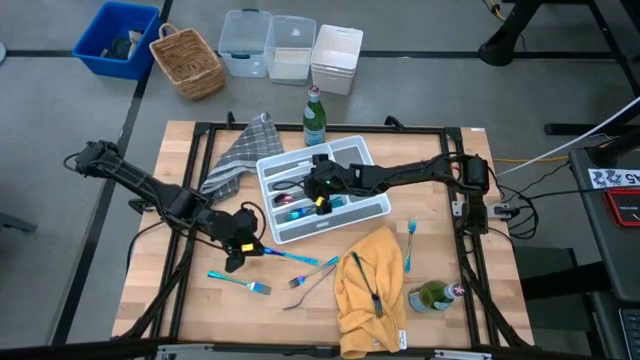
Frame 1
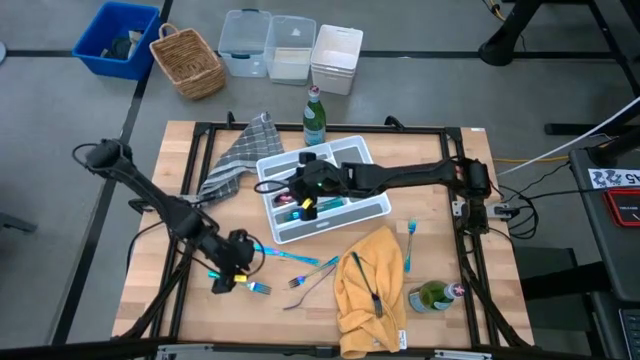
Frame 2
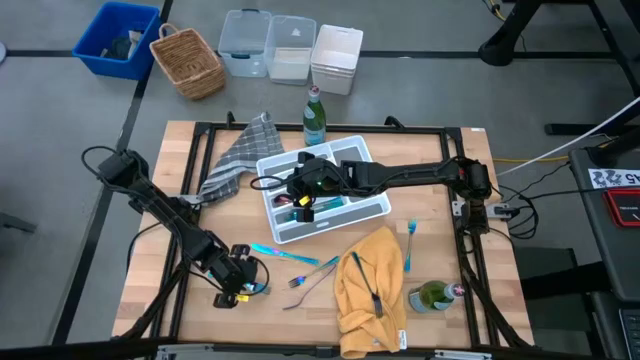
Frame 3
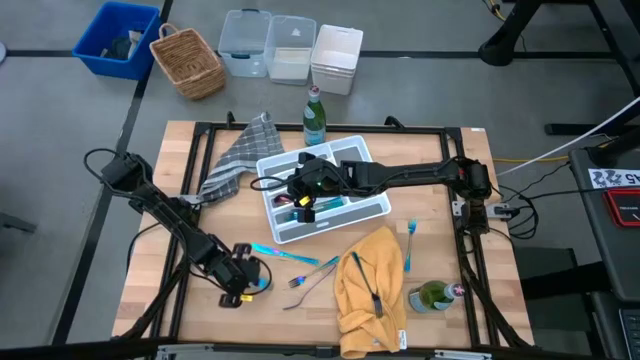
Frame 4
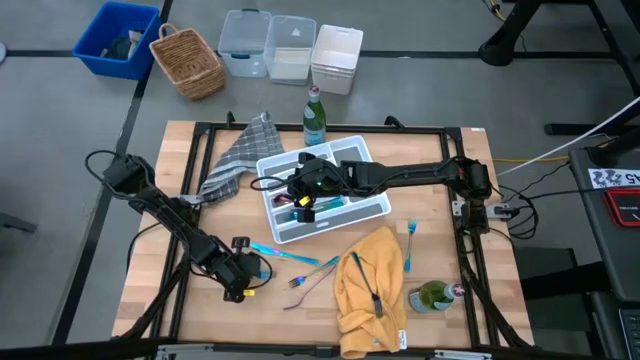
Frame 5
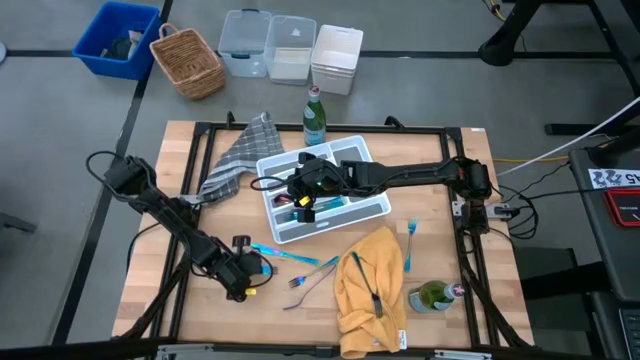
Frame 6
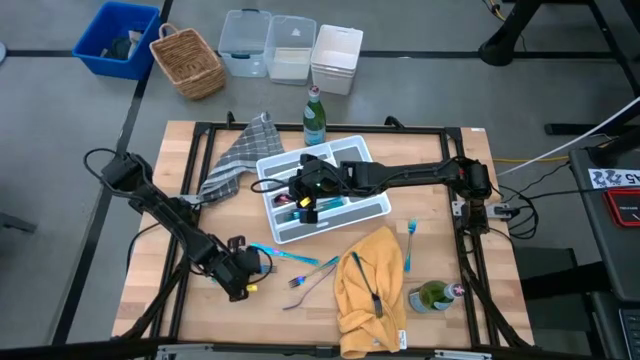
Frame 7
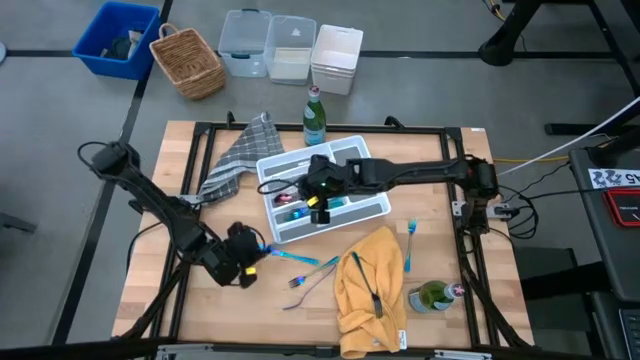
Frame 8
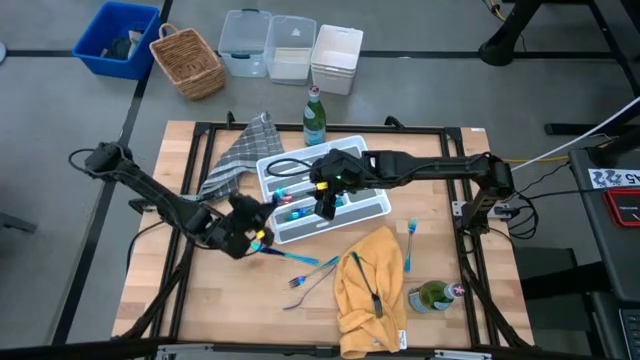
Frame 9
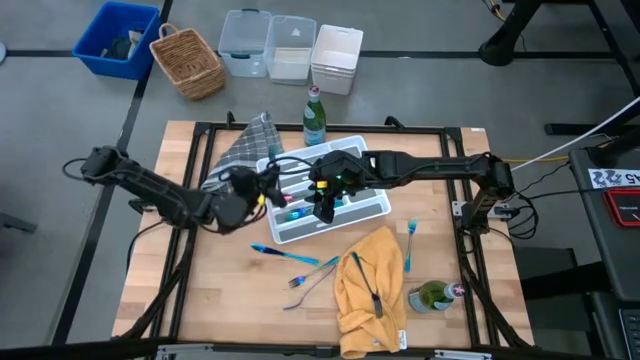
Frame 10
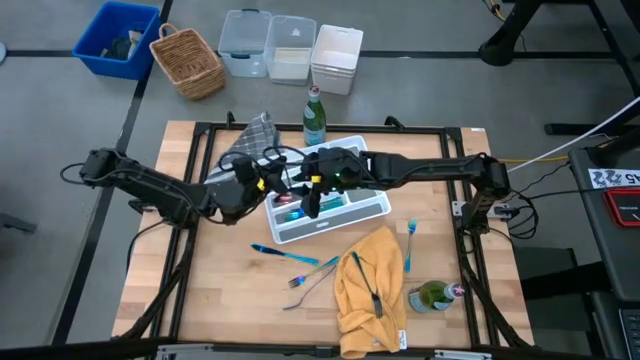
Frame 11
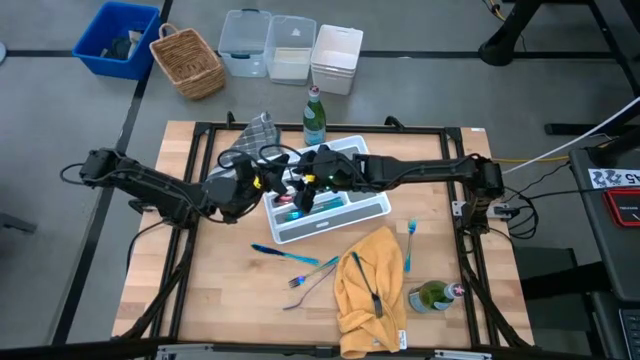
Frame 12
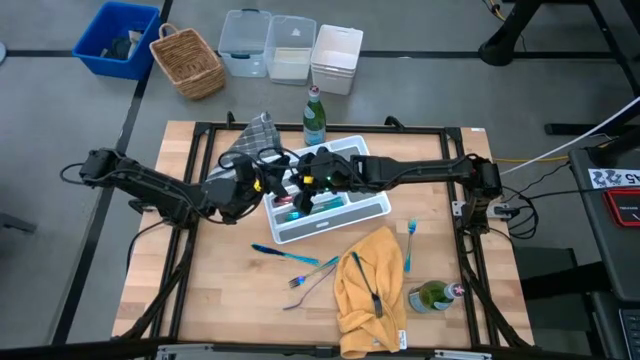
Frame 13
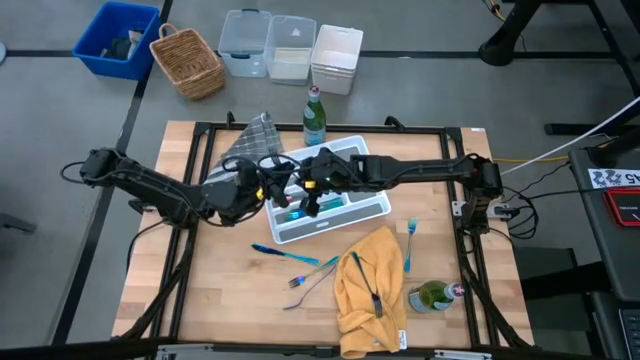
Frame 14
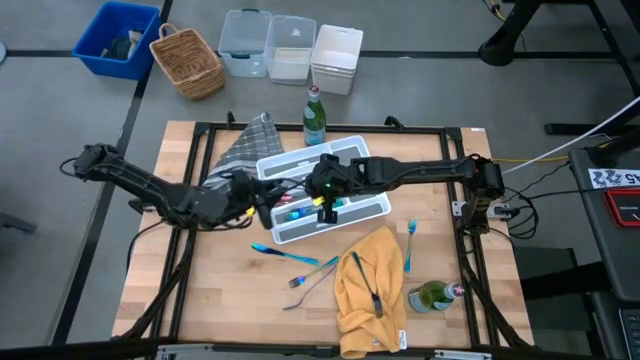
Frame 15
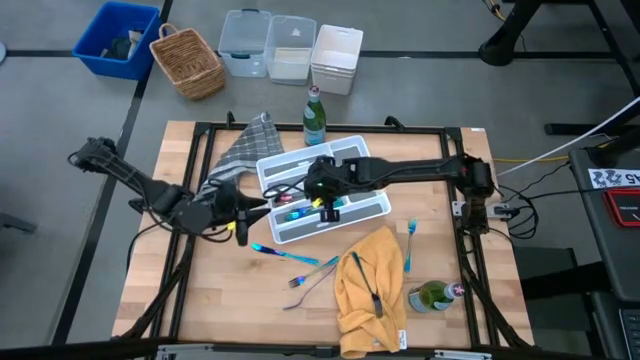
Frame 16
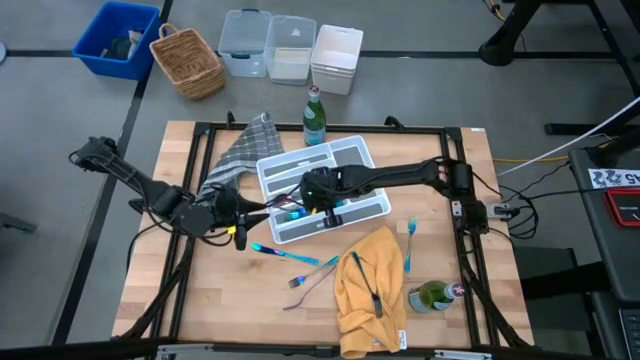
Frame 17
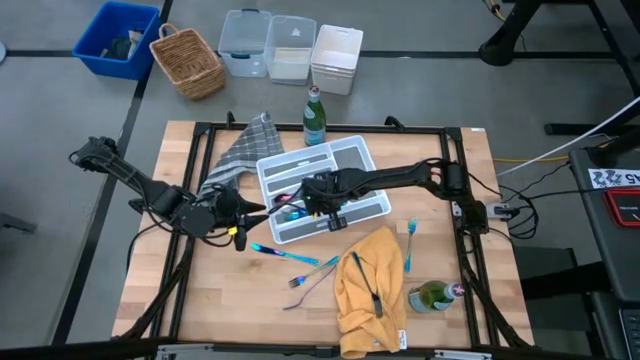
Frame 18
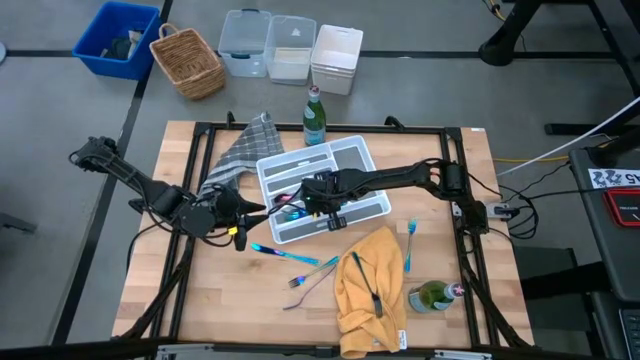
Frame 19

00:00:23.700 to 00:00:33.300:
Task: Sort silverware
Put the fork in the silverware tray

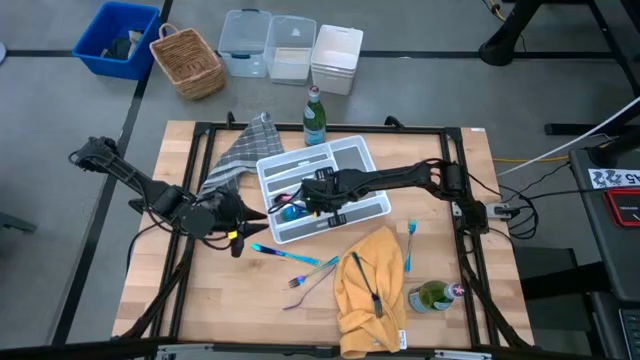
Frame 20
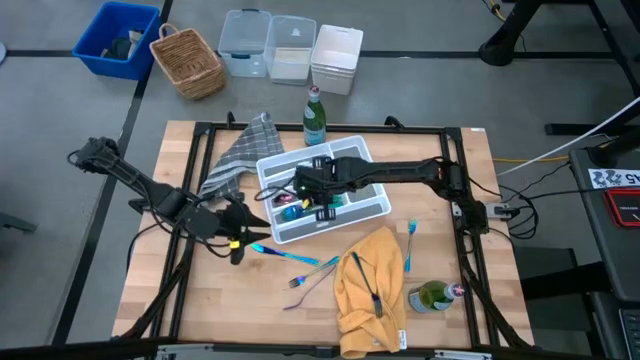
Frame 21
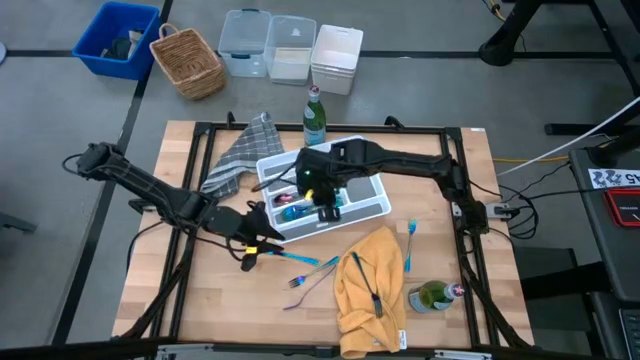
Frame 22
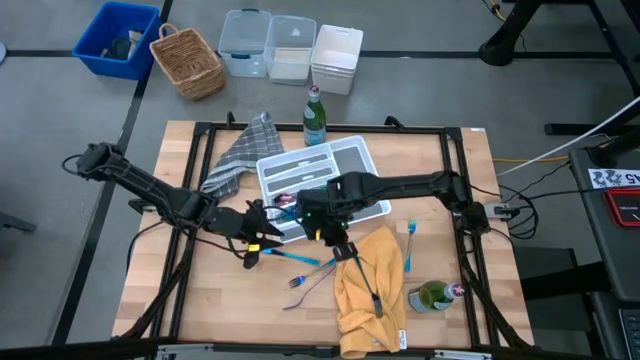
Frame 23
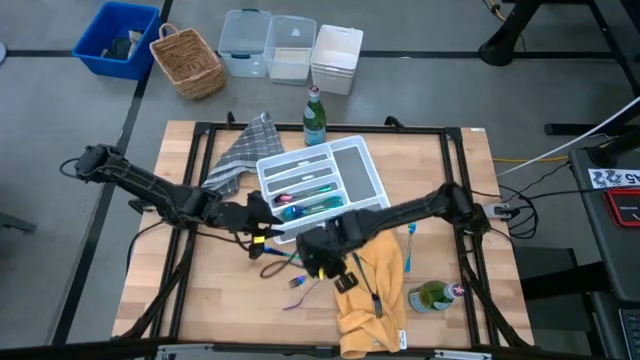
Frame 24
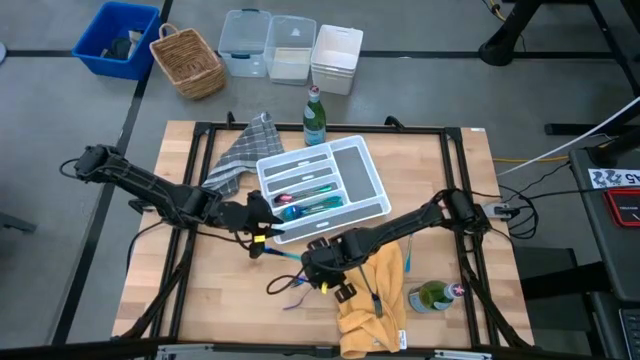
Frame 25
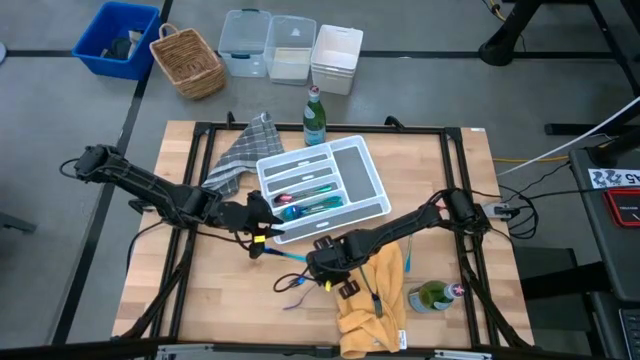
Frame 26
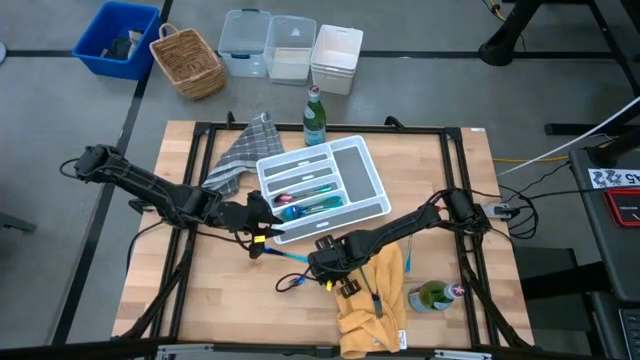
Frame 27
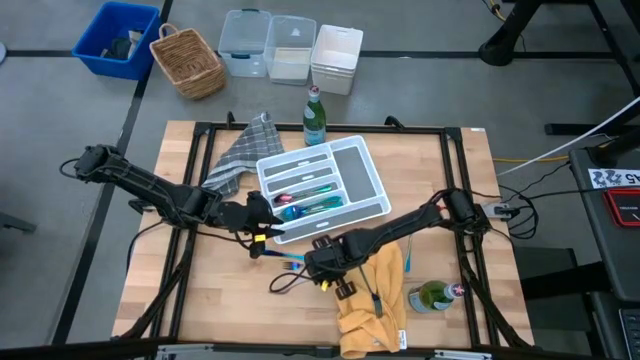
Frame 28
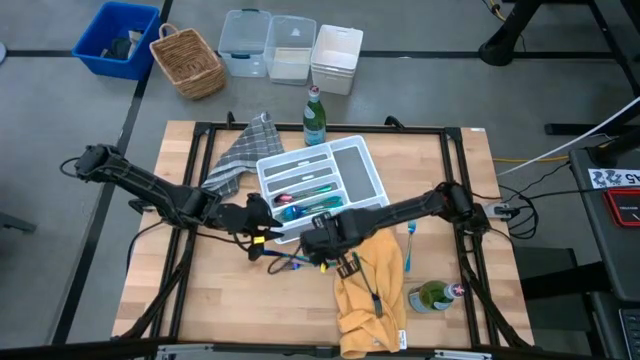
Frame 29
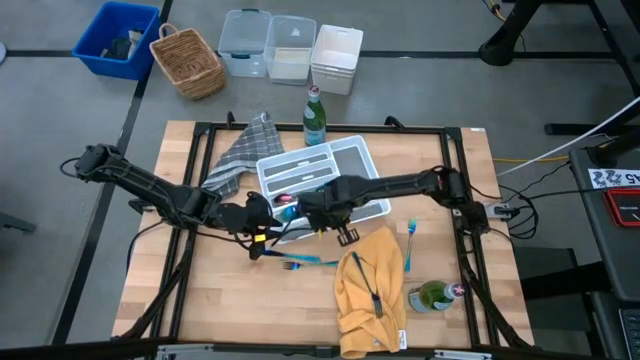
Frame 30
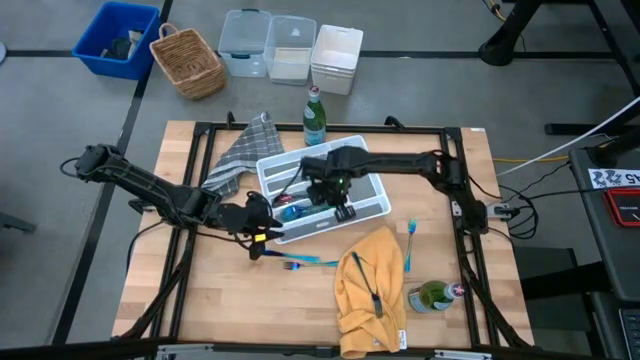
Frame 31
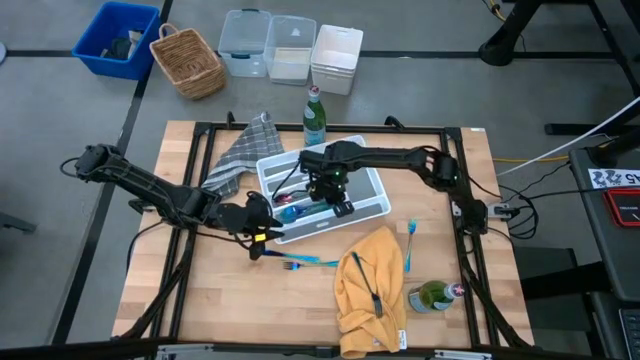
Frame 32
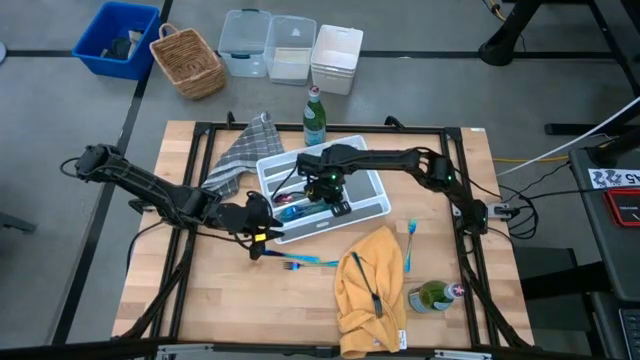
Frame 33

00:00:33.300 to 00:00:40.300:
Put the fork in the silverware tray

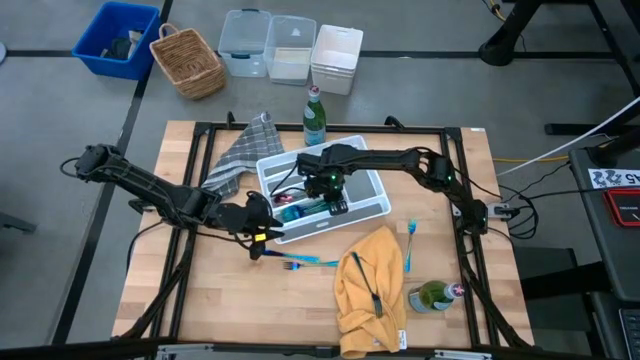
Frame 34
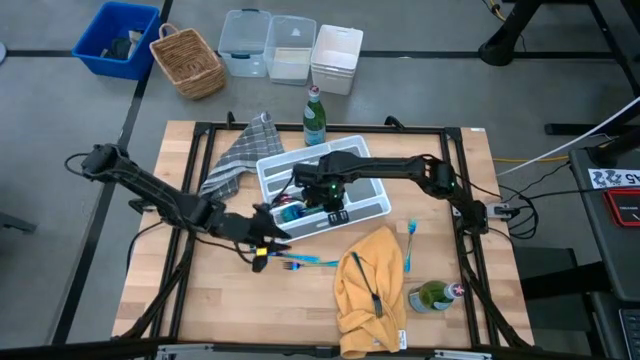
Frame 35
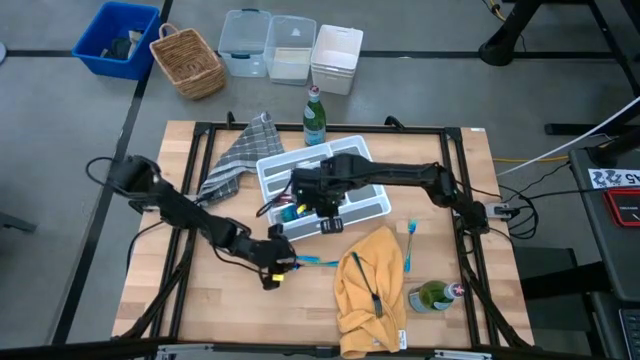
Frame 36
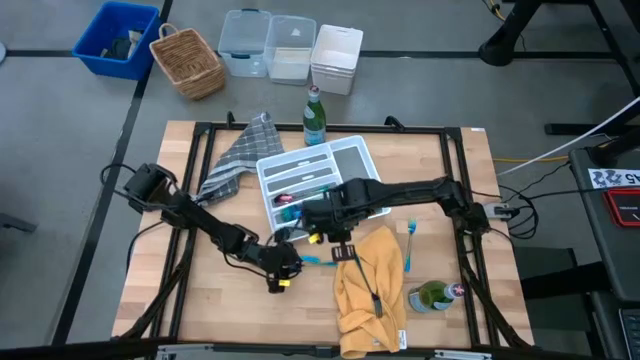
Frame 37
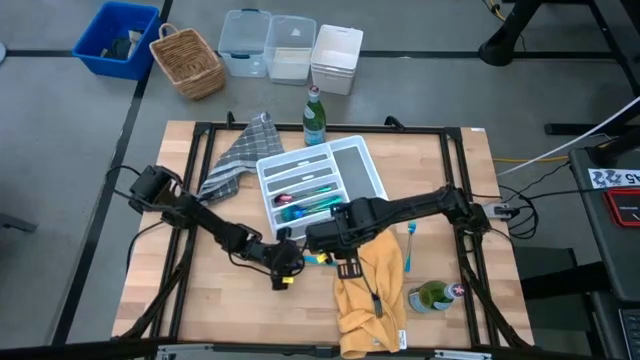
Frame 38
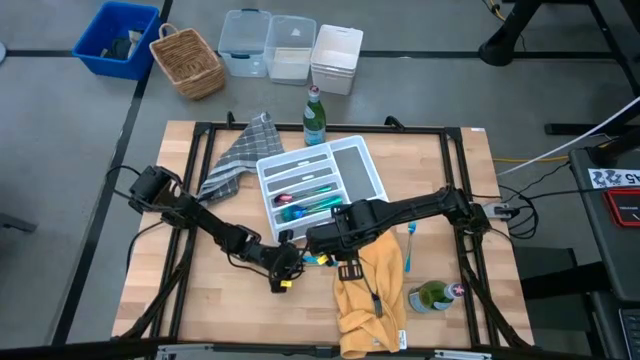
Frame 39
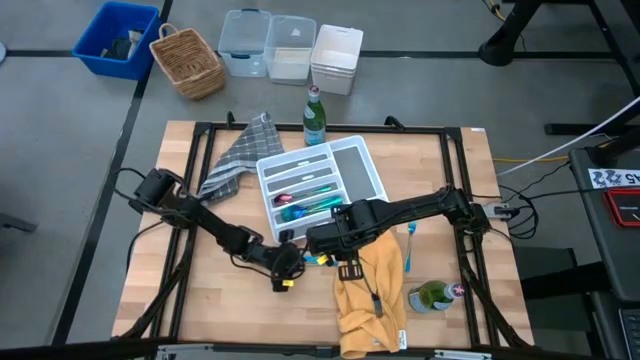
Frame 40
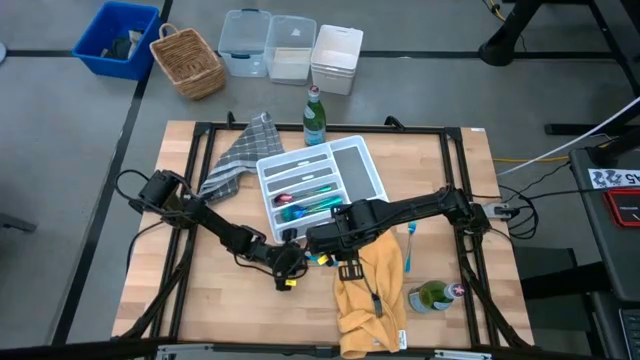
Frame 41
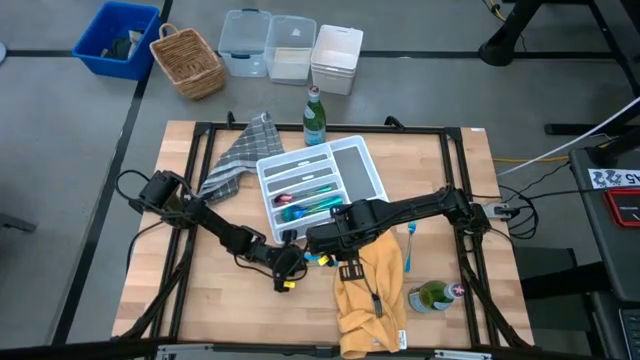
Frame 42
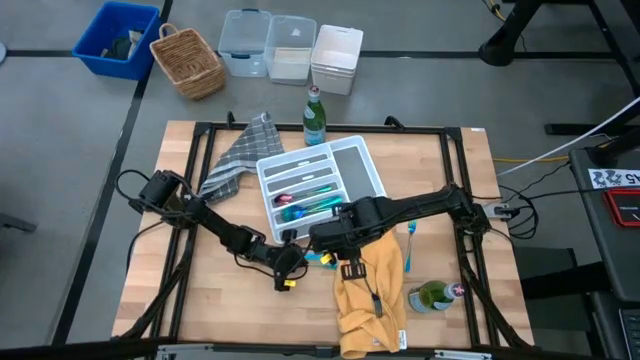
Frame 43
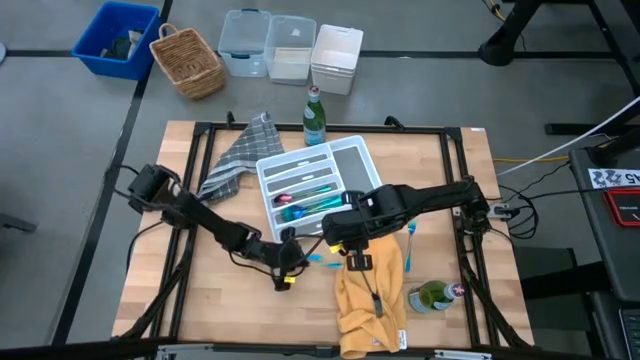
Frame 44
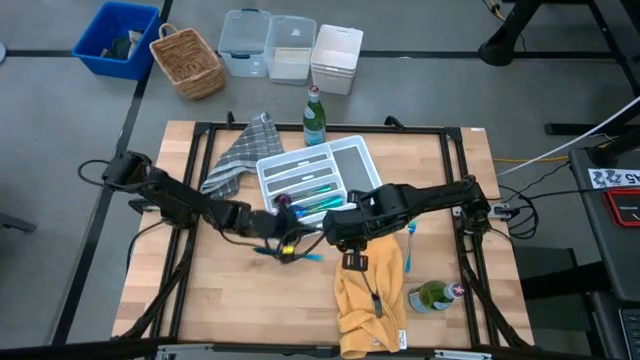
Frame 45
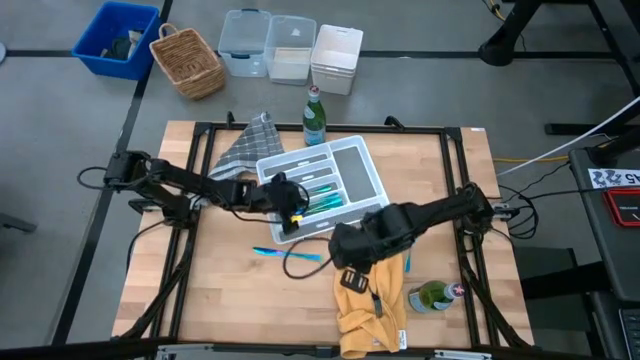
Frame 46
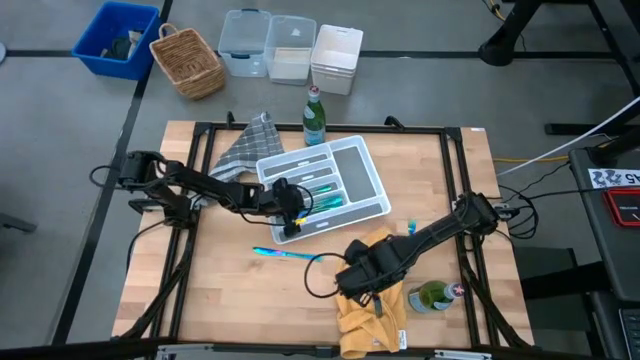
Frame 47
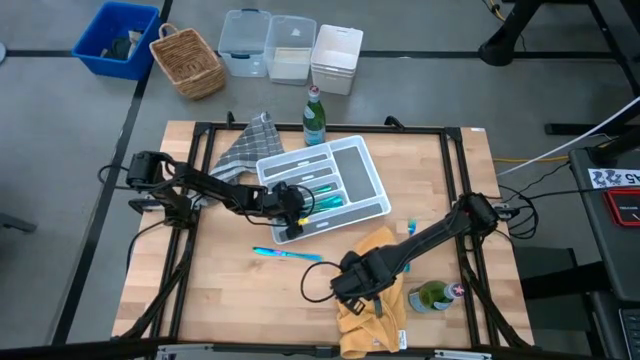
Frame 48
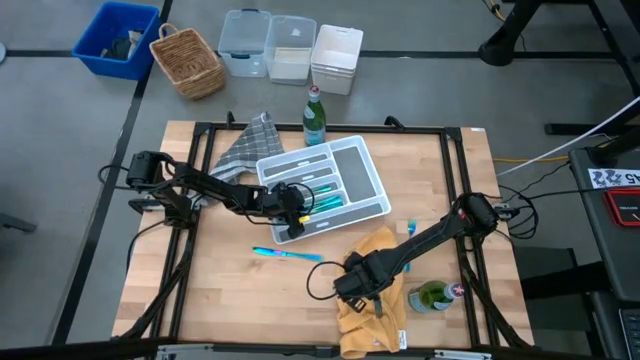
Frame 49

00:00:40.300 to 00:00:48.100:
Put the fork in the silverware tray
